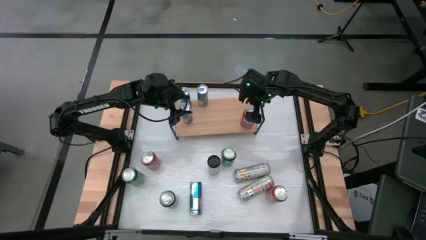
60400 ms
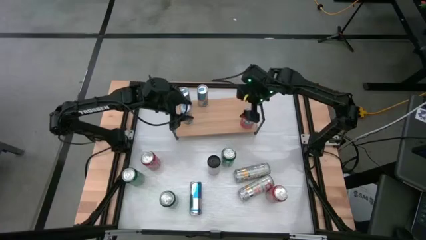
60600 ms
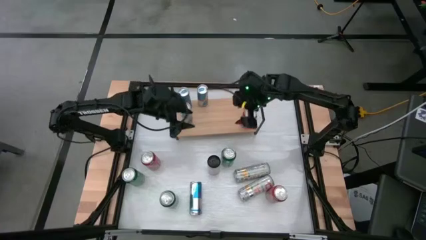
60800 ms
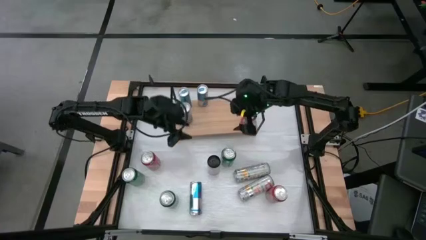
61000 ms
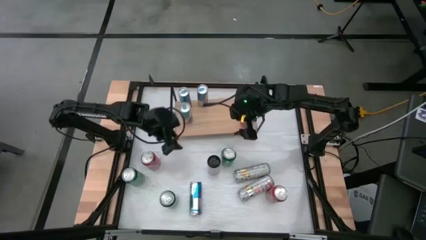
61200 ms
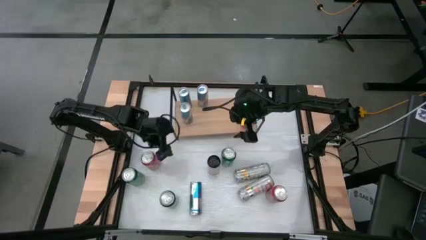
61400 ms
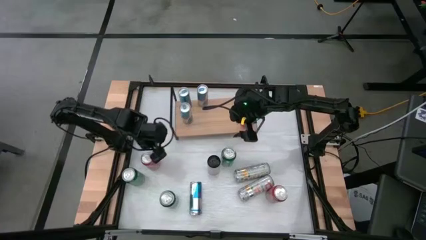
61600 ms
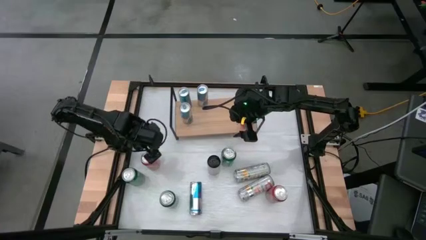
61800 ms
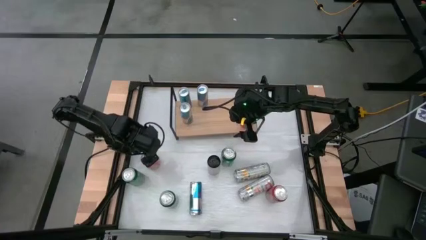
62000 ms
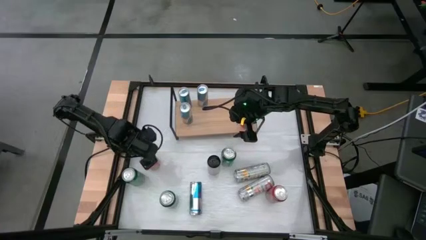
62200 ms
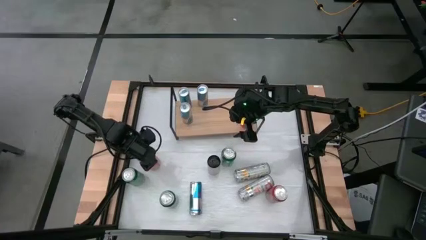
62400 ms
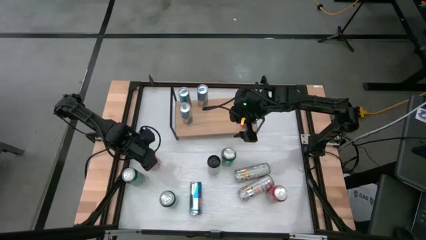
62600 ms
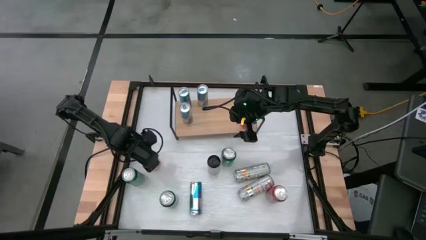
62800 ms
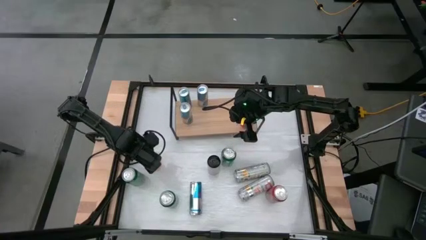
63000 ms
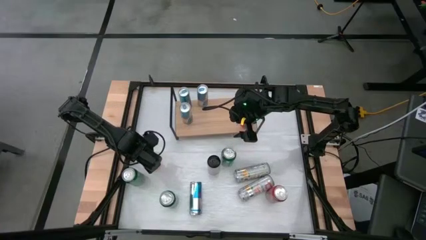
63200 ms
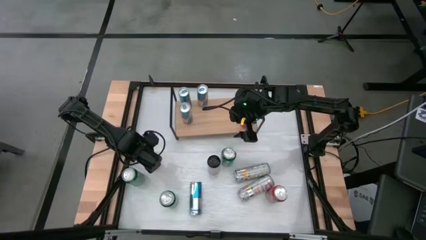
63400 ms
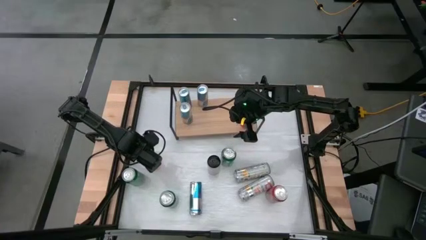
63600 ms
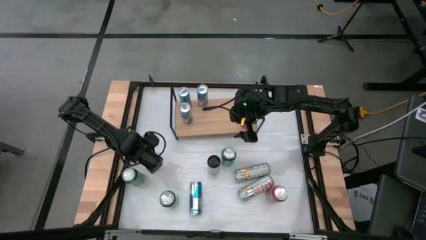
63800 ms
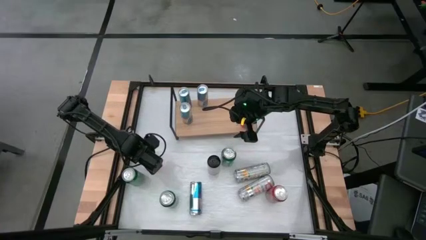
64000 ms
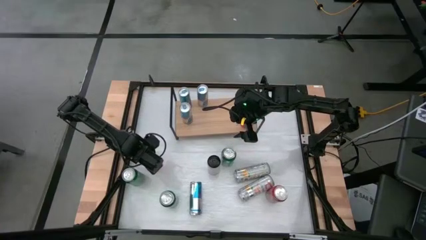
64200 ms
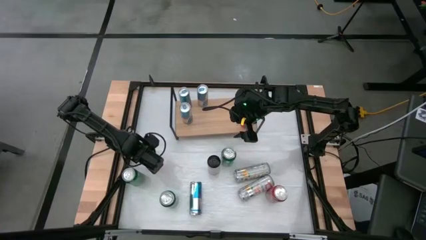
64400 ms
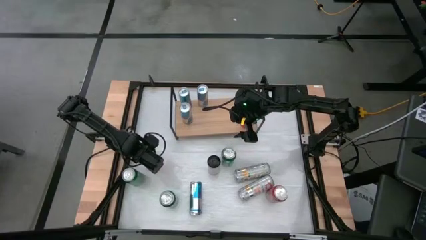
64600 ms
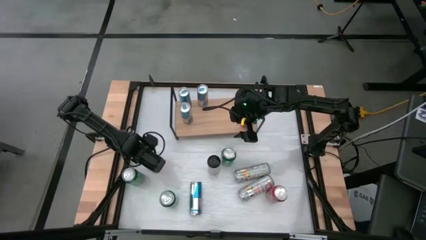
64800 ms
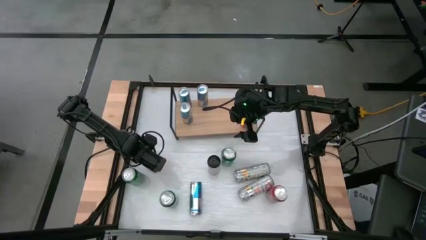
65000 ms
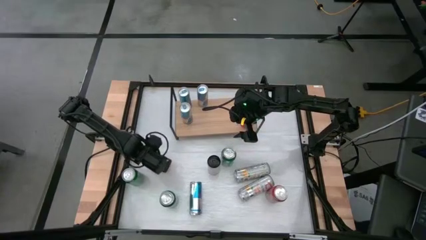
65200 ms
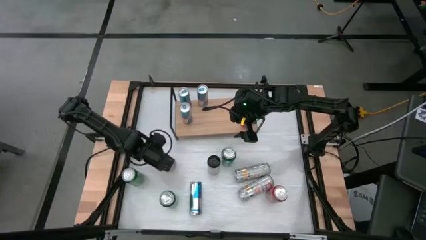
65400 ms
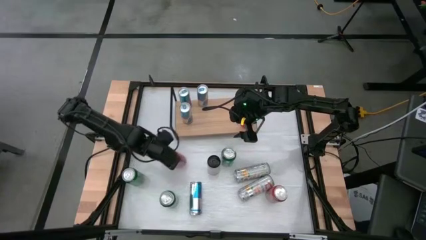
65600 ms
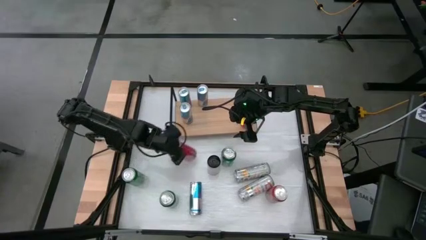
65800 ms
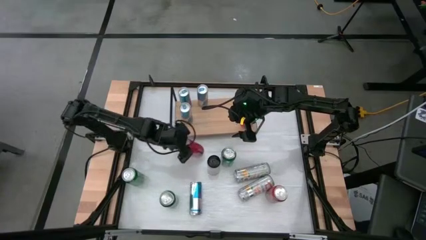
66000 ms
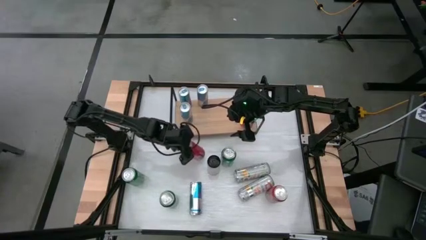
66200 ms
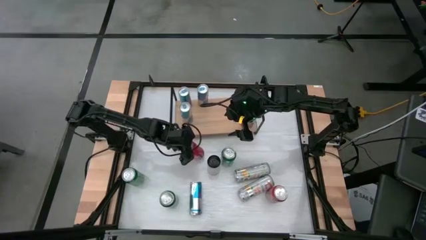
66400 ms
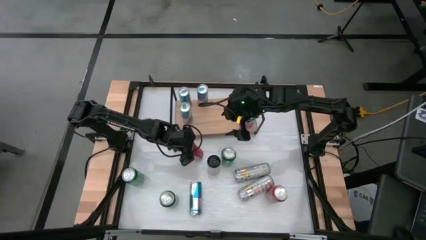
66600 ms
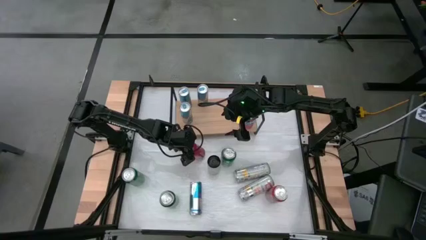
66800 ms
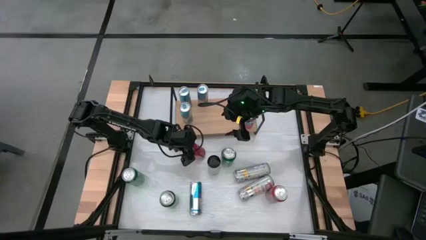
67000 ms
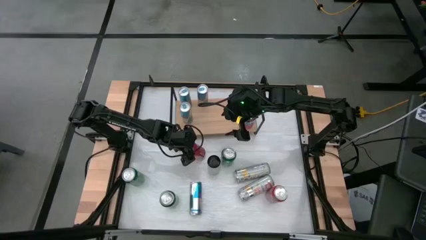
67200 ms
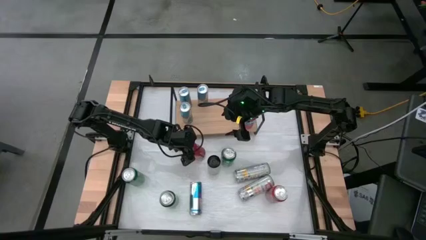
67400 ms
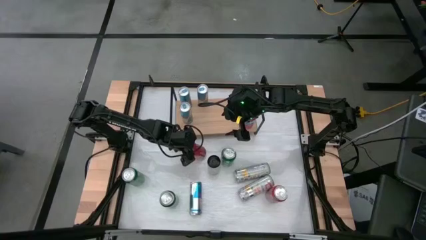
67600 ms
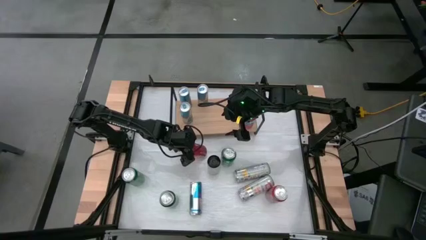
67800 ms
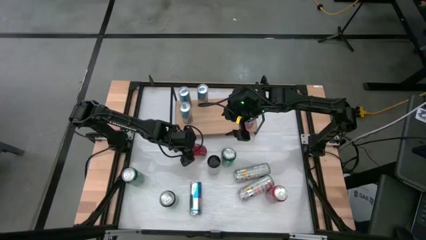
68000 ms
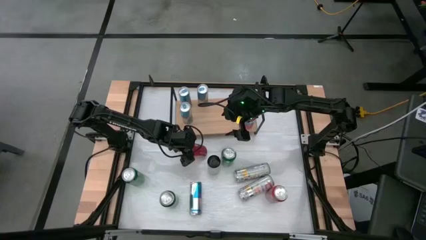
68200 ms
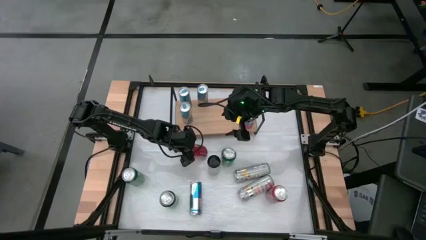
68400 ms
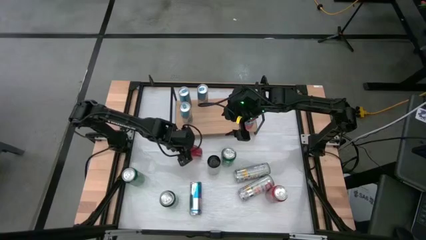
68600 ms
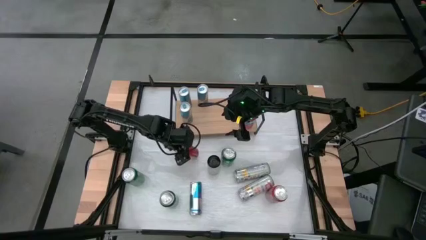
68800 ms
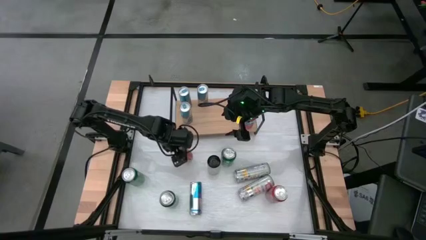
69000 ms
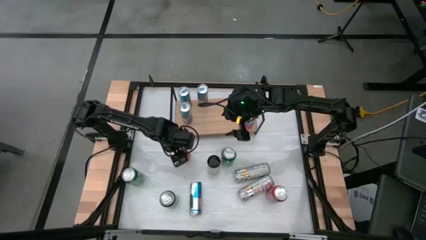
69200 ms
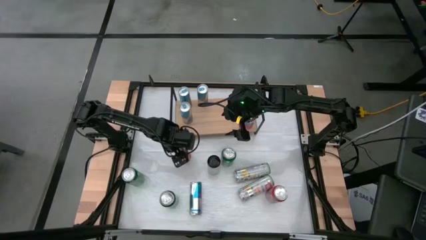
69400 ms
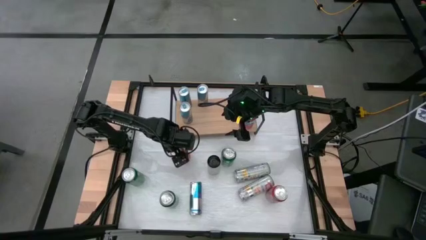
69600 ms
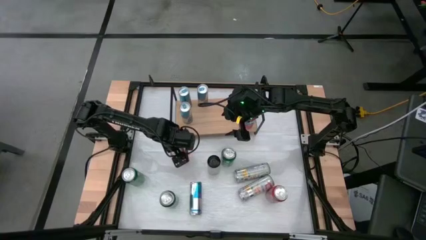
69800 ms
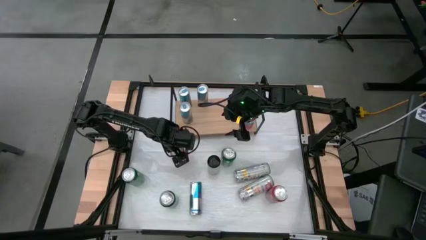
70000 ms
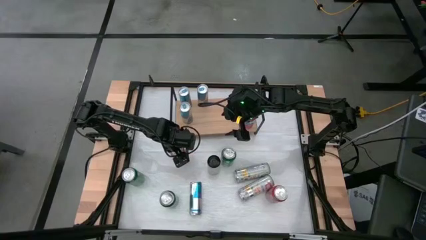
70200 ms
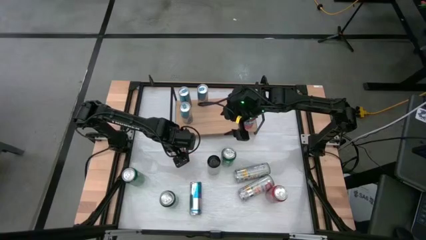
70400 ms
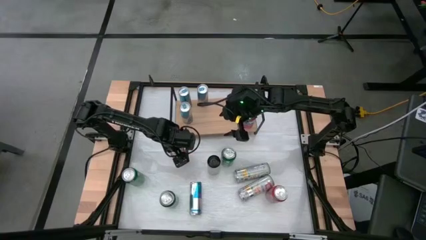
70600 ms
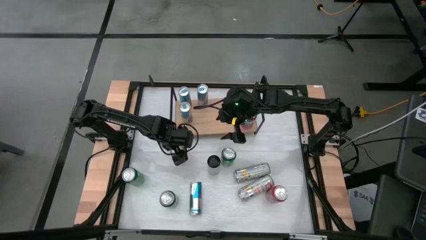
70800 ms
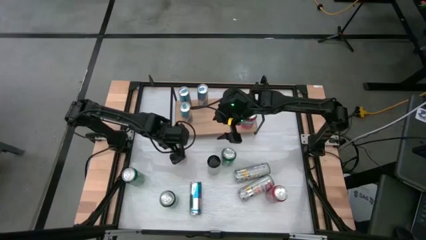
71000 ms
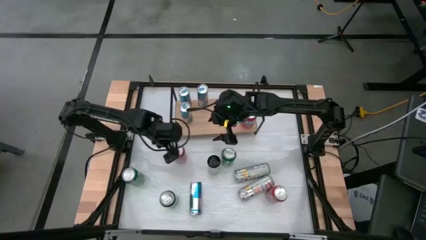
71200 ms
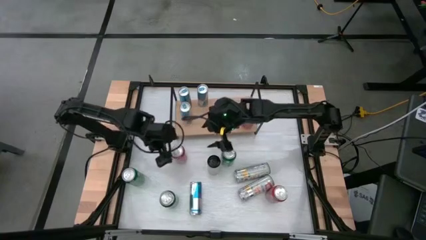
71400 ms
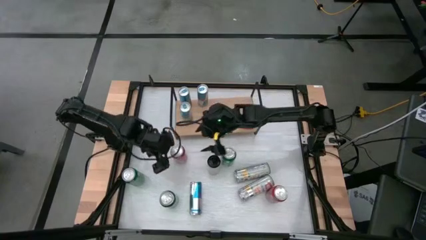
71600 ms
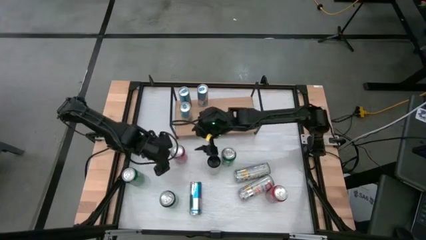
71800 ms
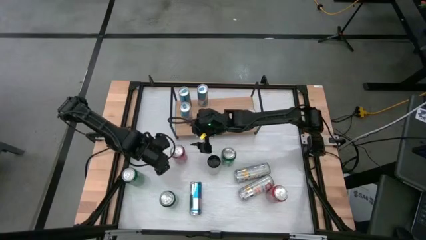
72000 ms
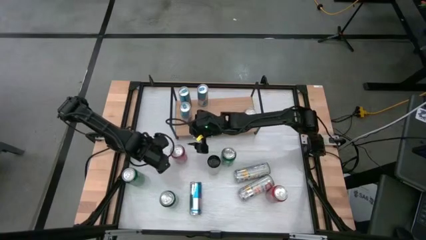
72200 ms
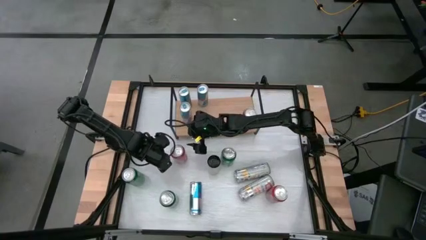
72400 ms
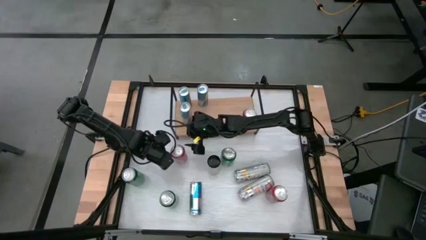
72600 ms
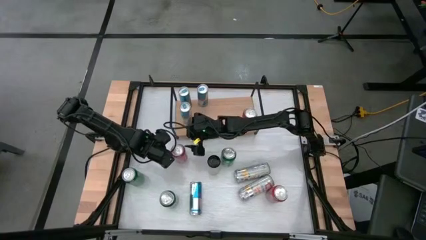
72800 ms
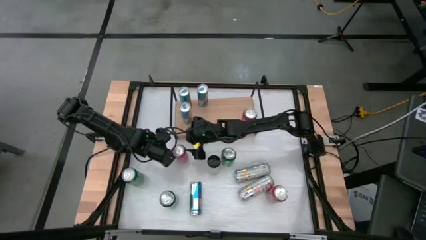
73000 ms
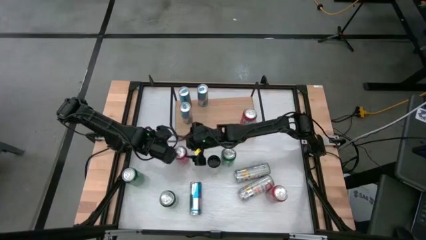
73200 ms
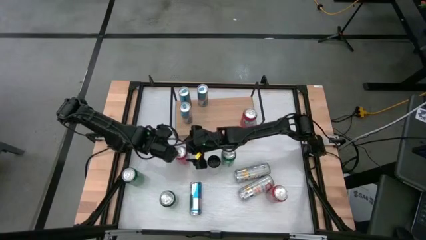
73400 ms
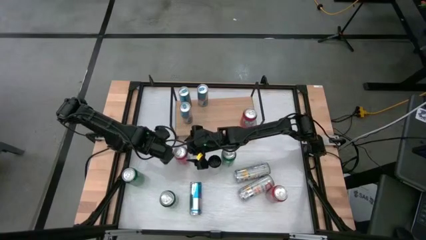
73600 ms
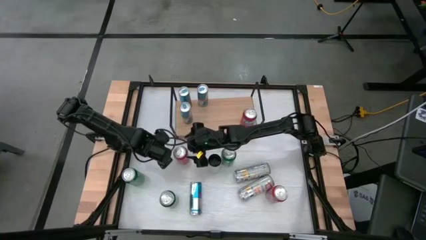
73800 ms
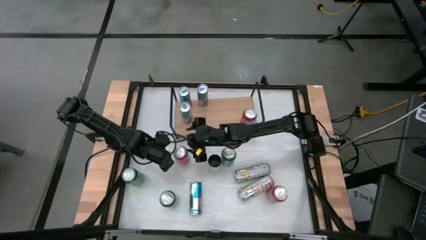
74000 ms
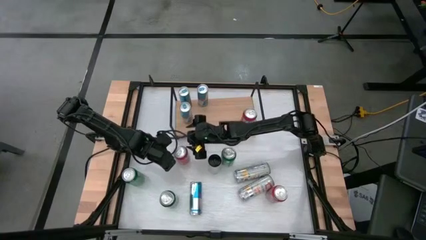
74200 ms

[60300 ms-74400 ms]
Task: Sort soda cans
Put the orange soda can on the shelf and align with the other orange soda can
